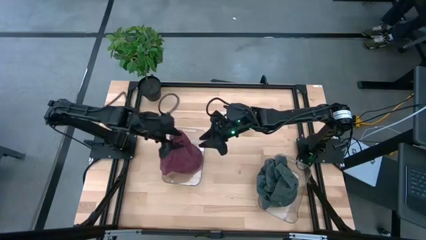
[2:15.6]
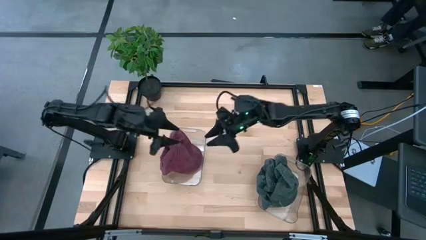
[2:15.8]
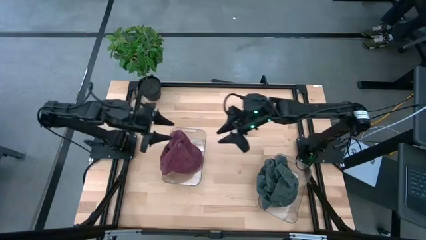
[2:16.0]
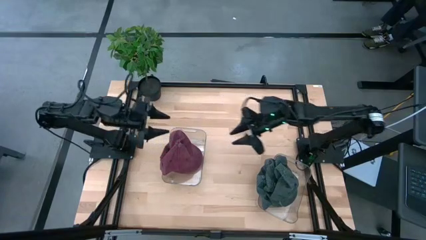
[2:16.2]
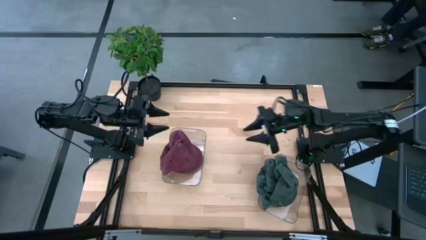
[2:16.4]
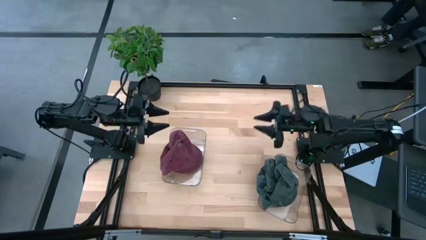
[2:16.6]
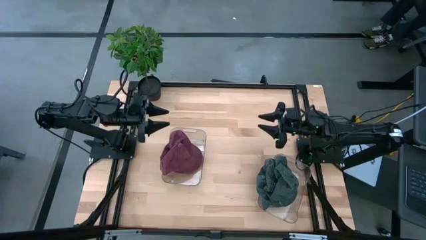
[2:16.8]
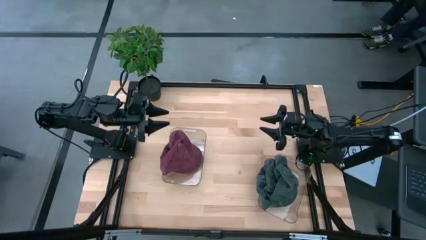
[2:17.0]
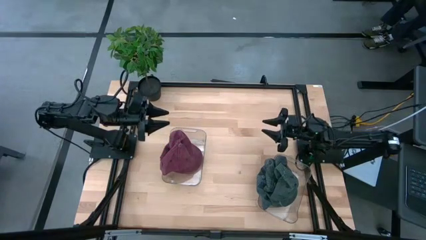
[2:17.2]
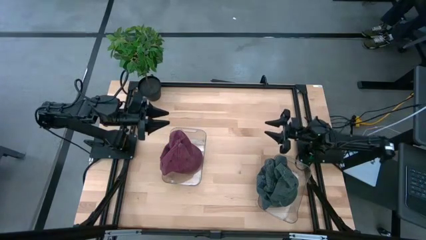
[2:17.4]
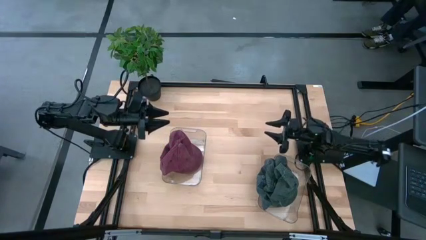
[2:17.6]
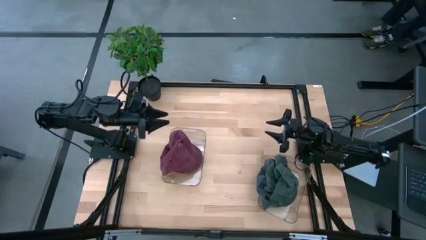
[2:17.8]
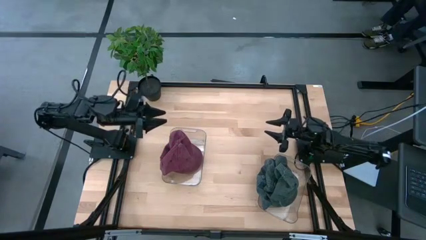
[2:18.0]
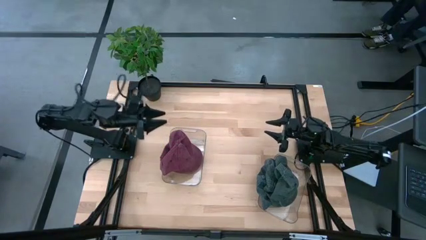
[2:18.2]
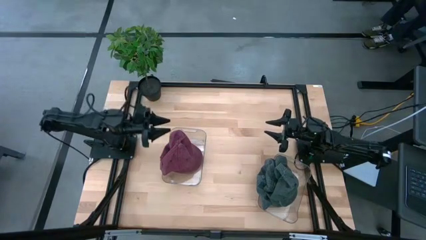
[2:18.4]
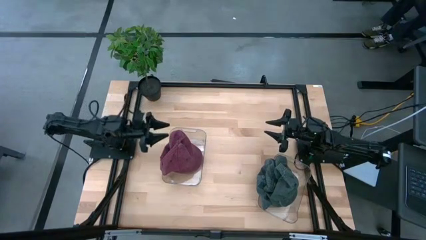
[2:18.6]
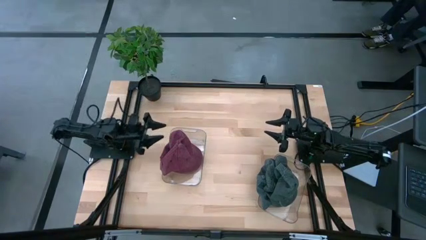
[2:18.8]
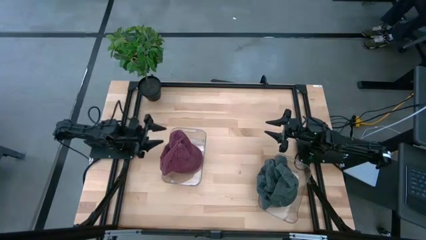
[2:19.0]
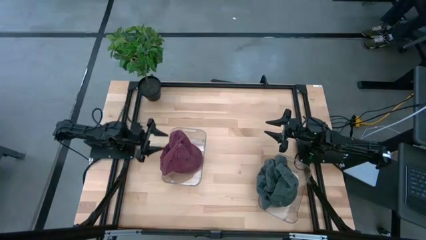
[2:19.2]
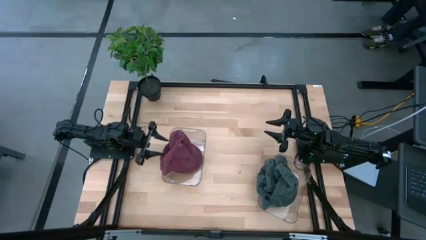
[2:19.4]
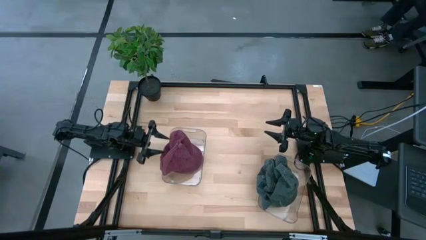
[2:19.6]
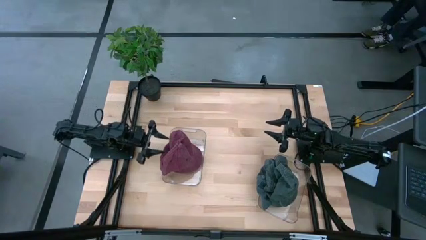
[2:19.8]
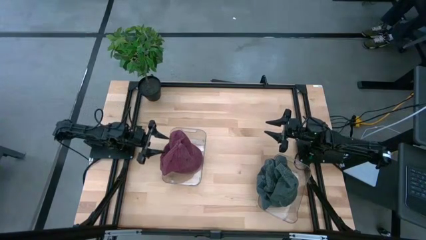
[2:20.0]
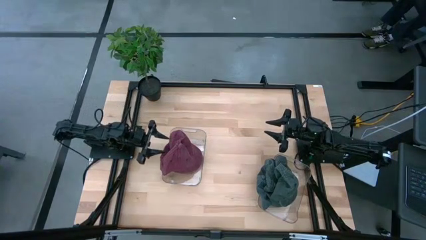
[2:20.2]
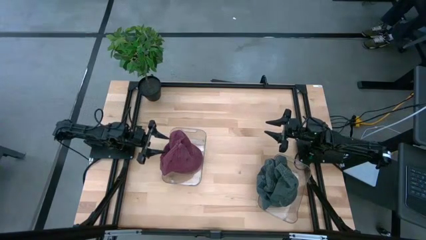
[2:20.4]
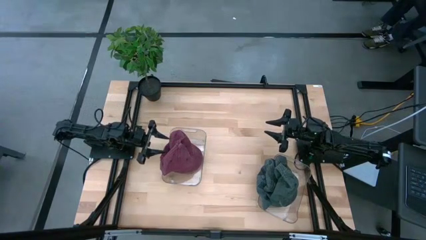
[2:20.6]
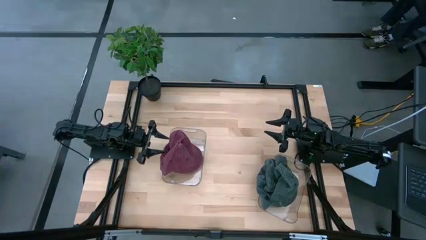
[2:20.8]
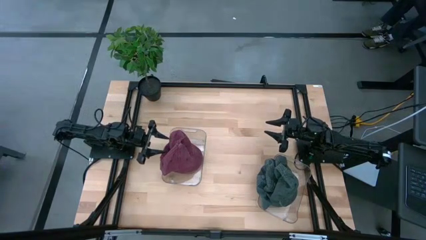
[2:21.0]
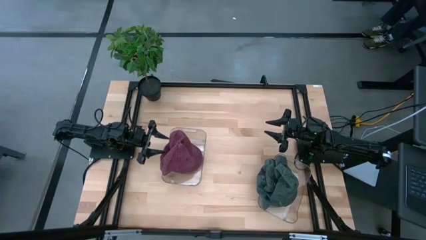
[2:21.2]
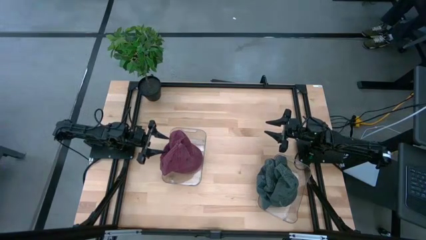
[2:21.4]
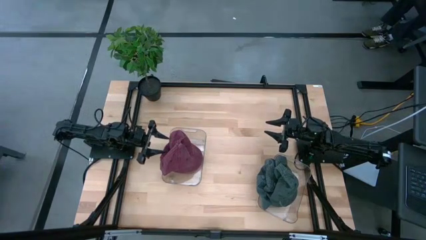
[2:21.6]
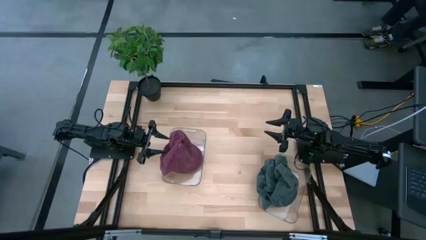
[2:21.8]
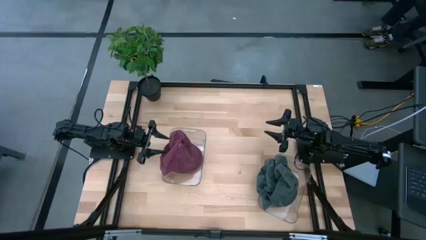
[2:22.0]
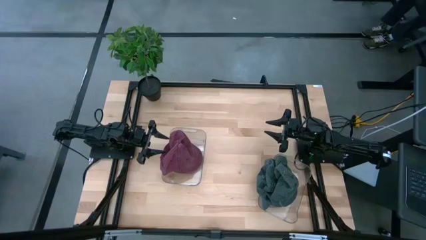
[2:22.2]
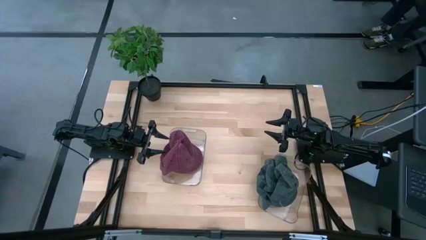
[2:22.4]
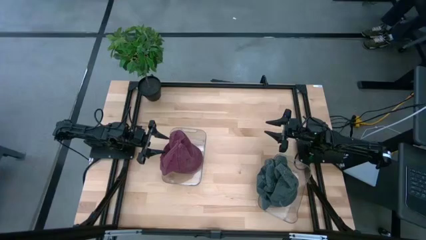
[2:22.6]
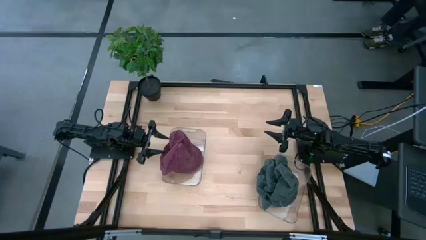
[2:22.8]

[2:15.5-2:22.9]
Task: Pick & Place hat
Return to Home Position

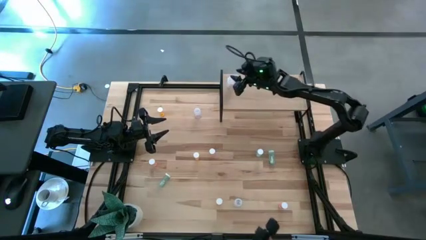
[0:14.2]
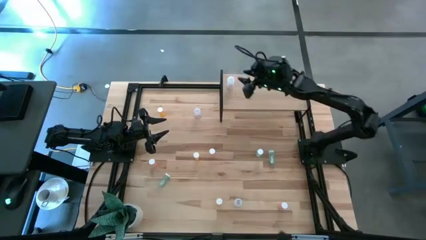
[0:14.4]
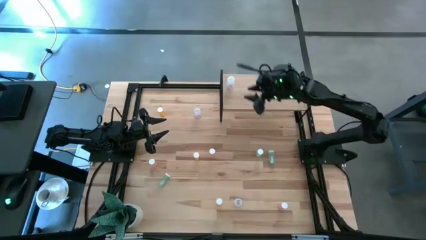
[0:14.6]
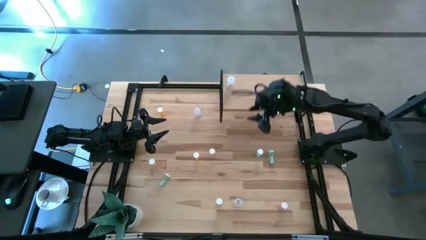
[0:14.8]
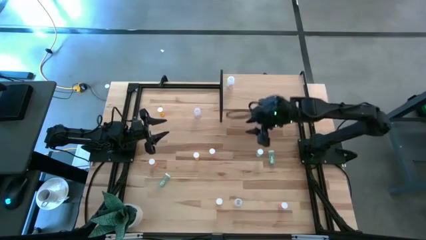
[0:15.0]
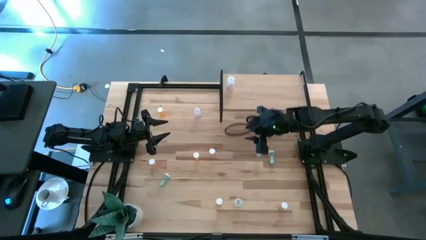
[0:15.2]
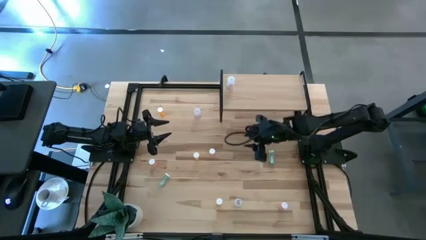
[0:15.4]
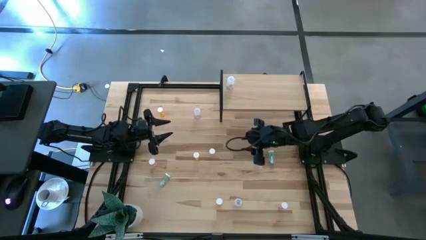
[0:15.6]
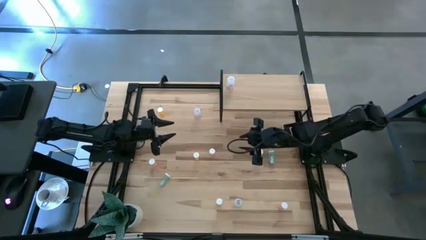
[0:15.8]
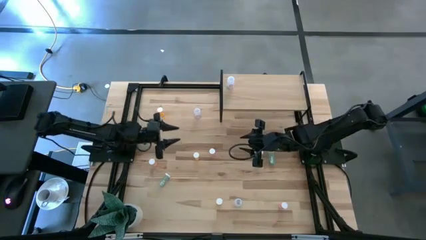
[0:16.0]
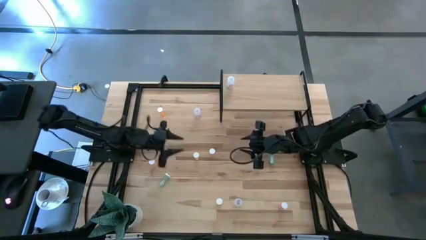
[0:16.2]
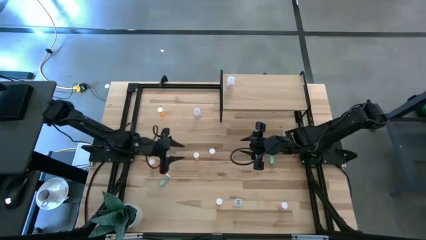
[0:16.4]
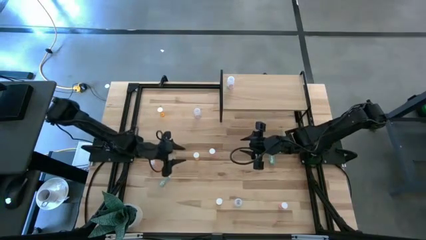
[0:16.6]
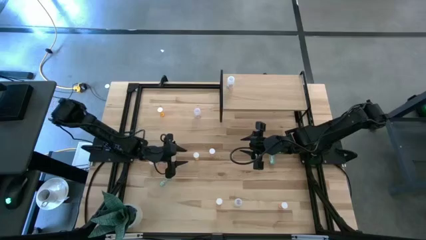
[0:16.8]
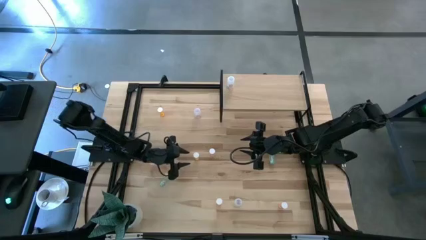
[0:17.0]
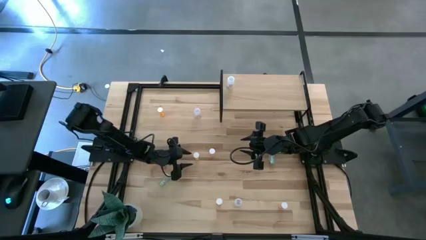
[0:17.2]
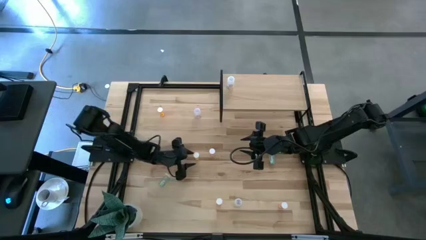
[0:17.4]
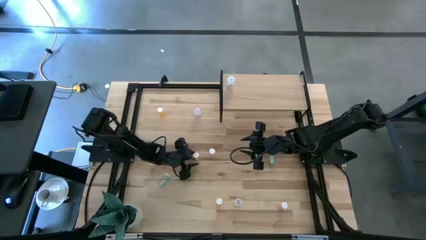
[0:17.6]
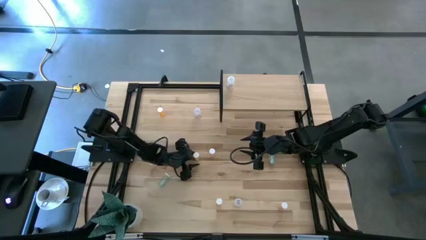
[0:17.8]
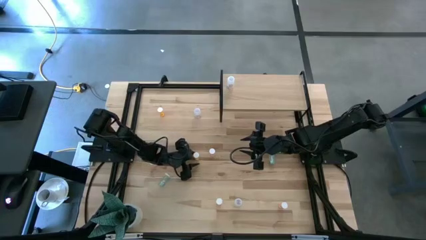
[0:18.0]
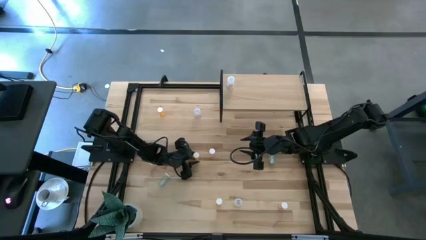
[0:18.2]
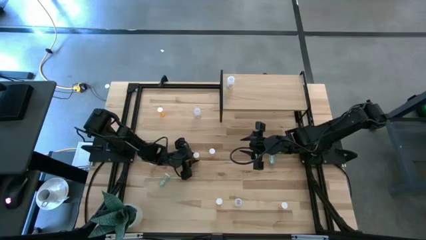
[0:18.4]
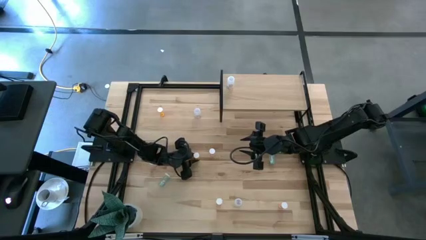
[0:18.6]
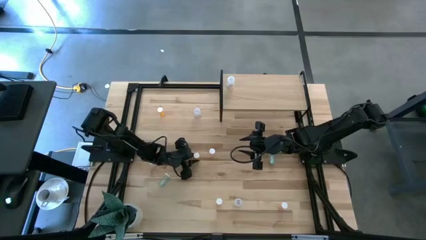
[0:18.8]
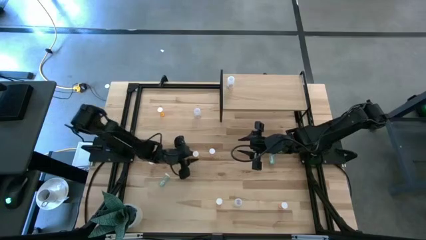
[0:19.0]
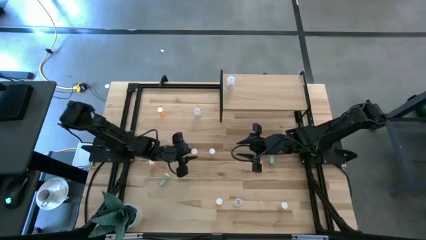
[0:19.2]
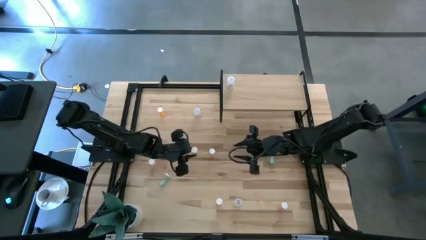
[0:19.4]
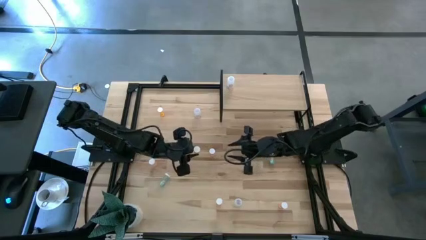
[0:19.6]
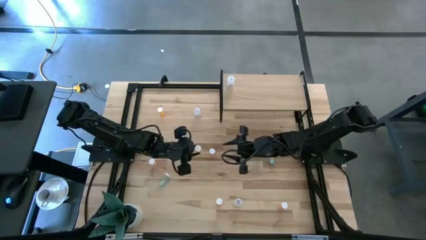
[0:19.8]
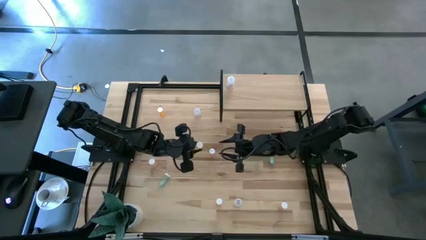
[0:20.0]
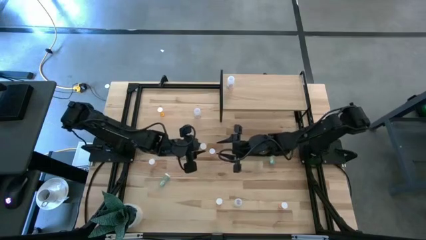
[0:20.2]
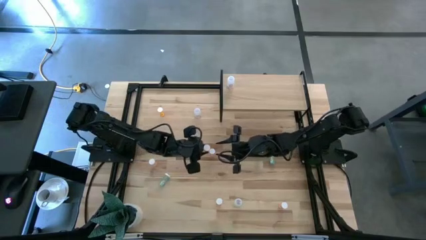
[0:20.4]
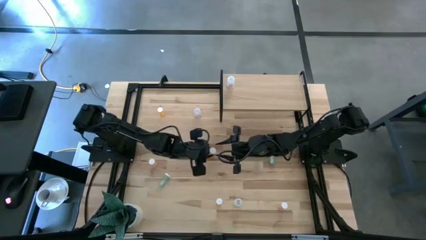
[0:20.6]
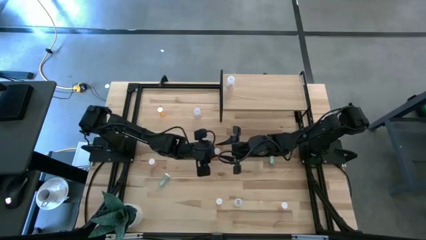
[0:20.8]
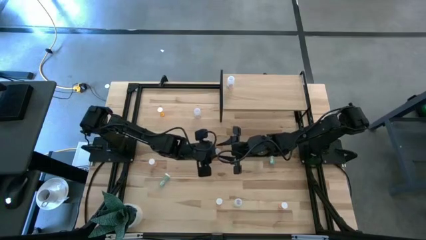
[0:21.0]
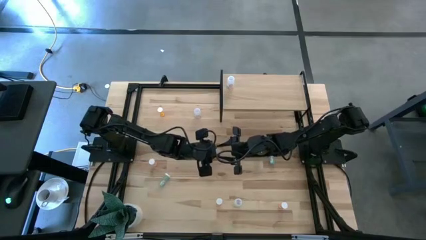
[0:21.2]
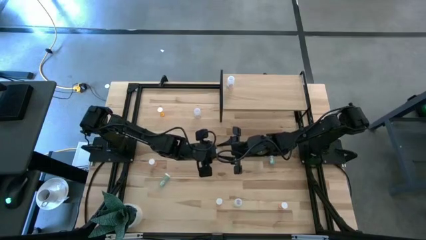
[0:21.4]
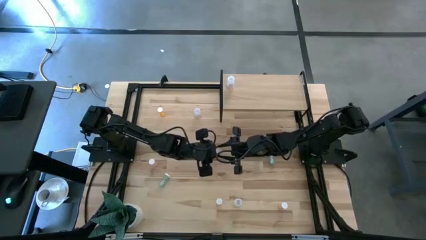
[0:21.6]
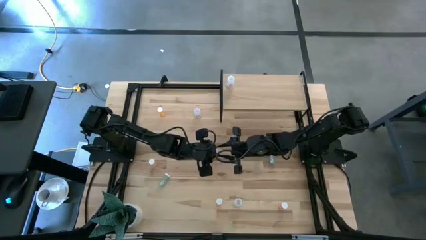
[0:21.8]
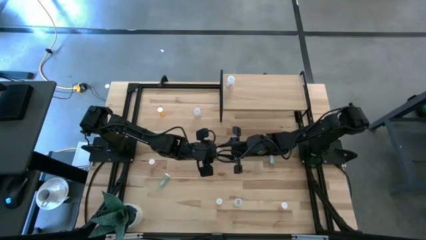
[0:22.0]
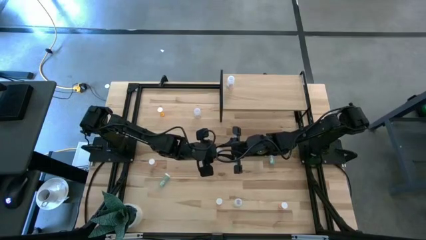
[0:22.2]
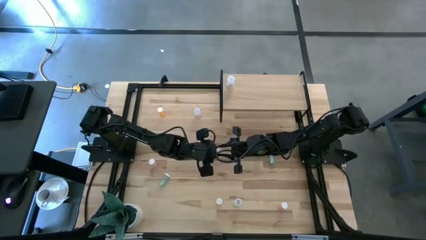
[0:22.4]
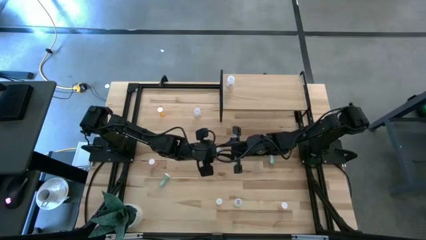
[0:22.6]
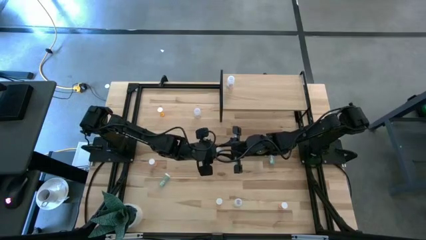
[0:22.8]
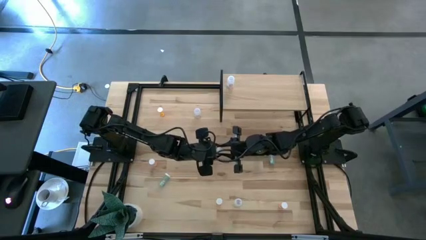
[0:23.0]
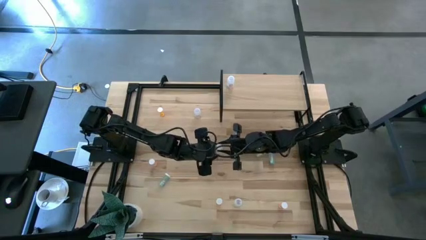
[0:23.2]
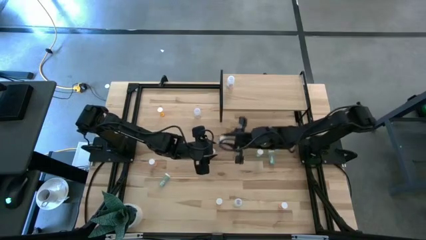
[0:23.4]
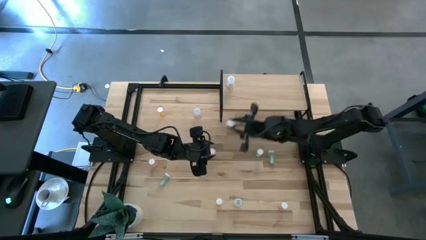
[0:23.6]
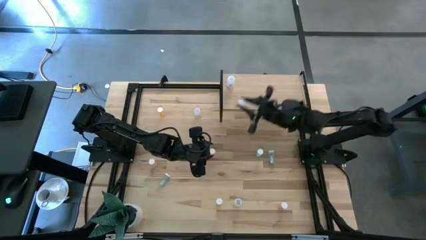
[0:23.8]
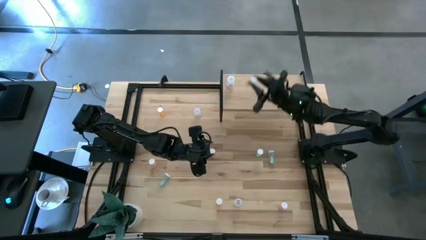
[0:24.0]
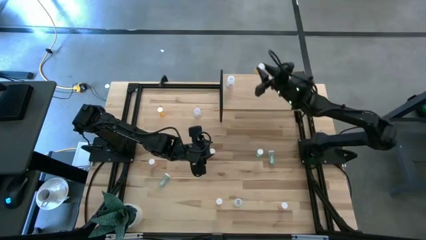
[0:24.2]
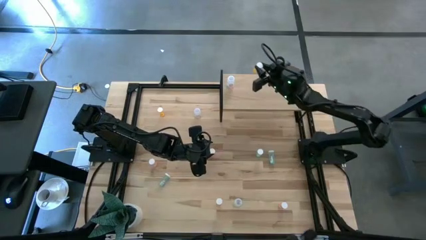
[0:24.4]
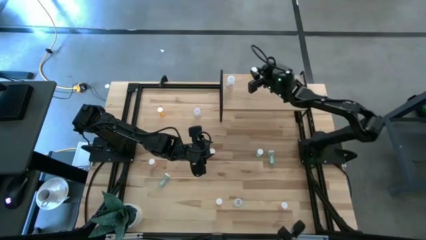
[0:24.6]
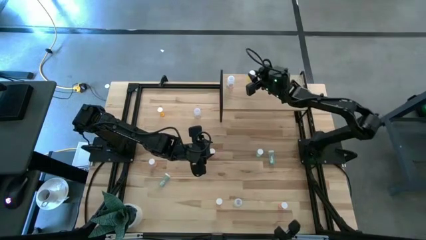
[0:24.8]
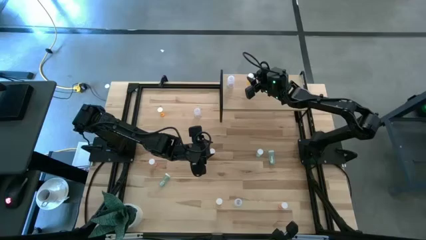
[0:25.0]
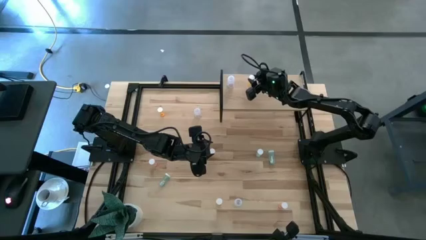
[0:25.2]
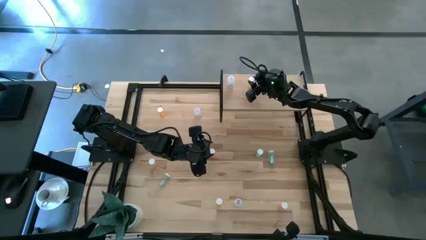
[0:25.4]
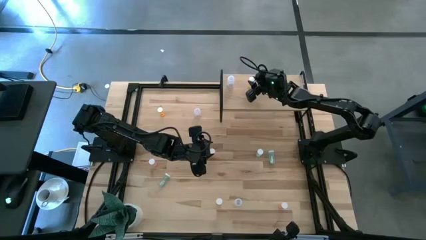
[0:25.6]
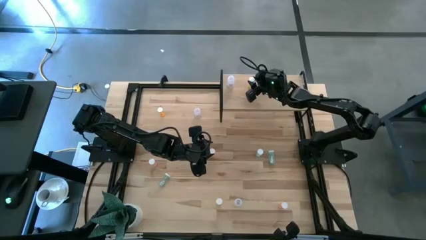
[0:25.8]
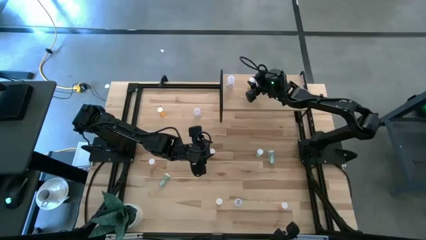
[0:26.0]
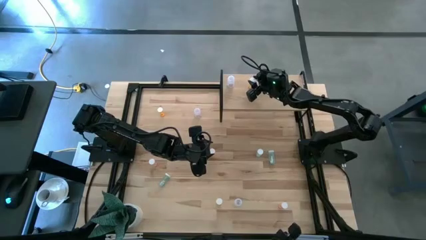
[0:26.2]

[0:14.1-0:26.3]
Task: Pick and place medicine bottles onto shelf by color
Put the center orange pill bottle on the shelf
